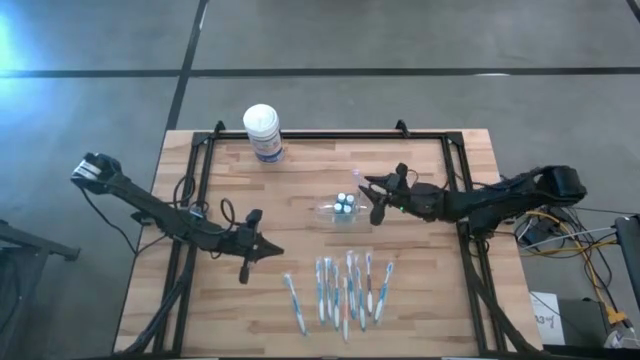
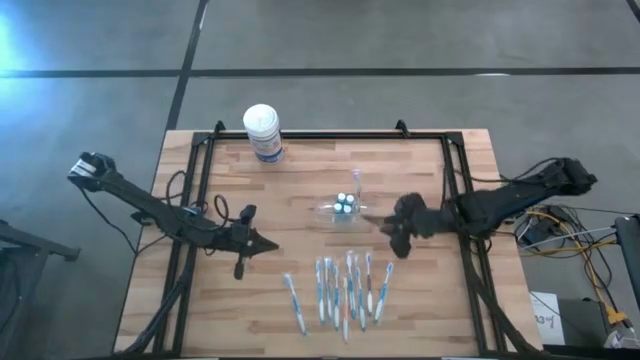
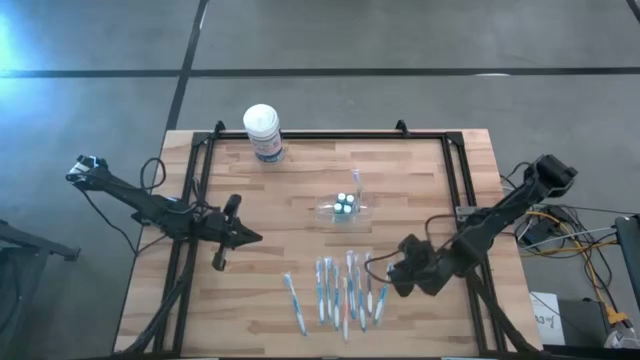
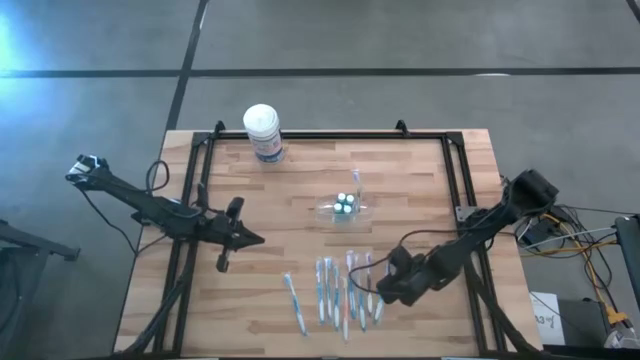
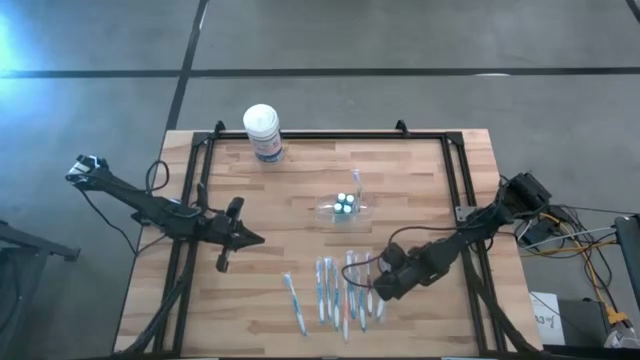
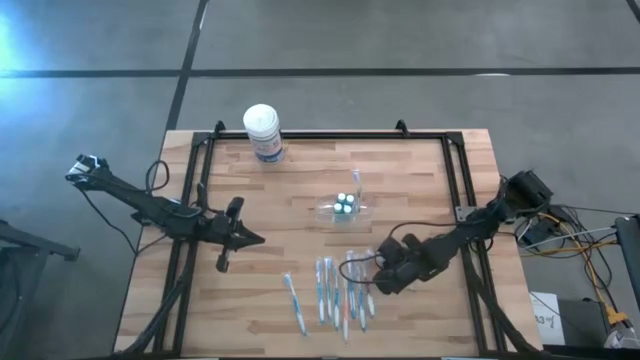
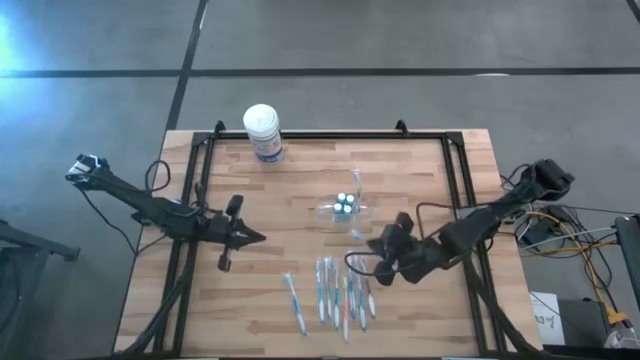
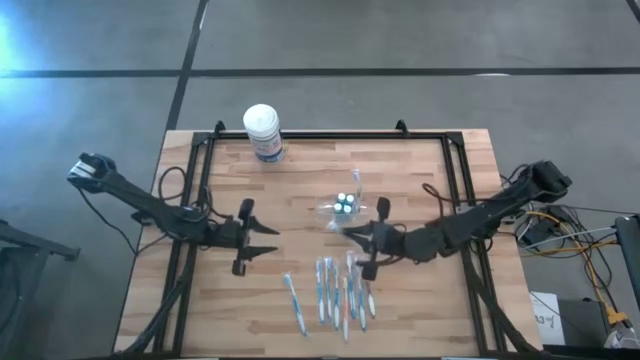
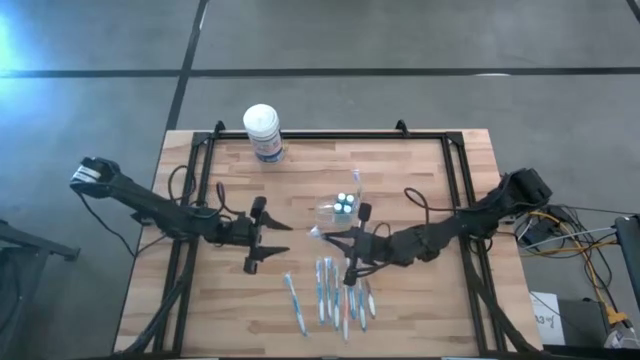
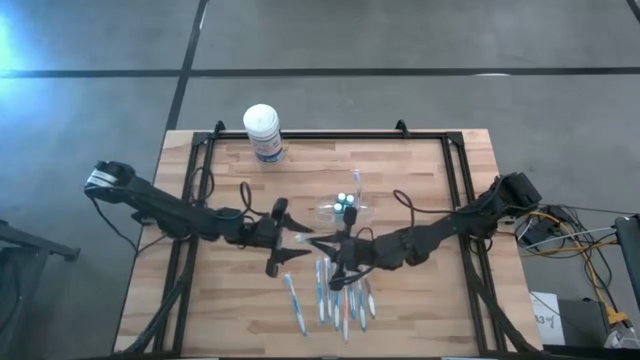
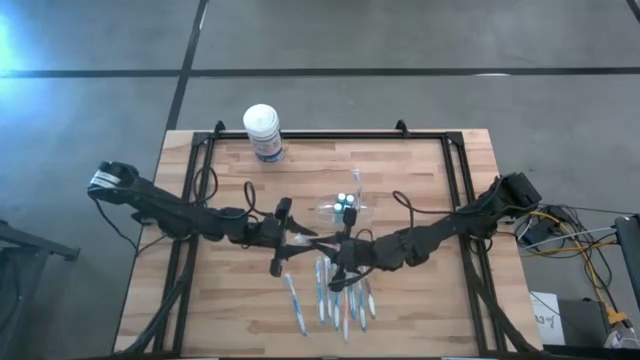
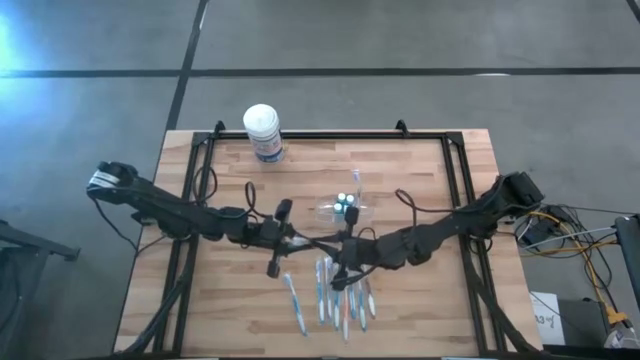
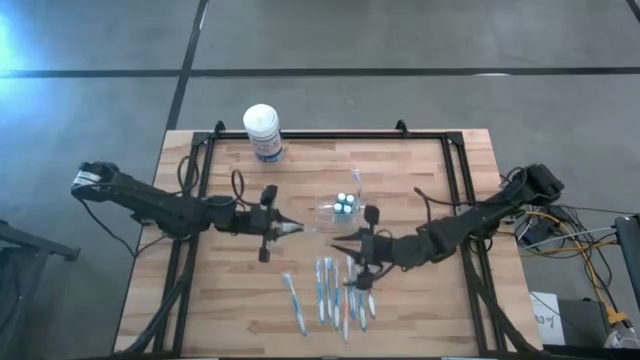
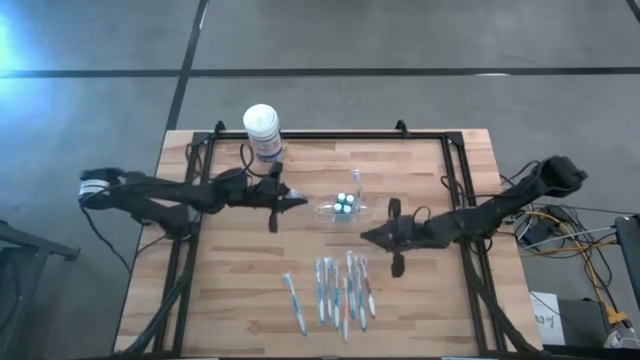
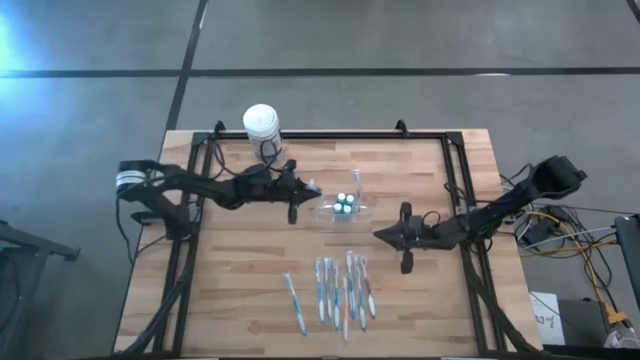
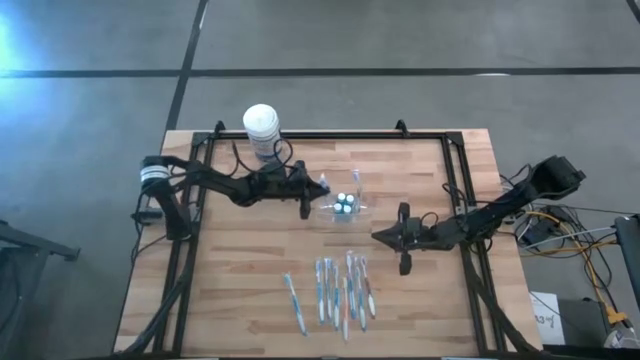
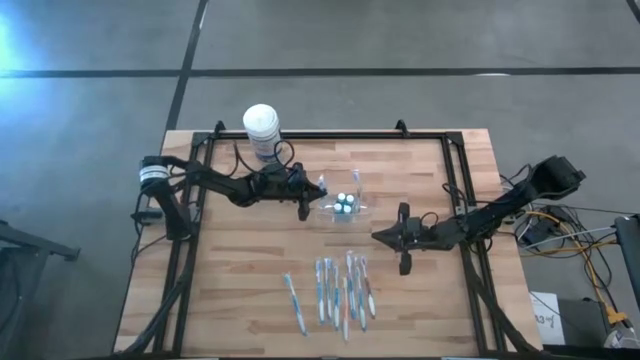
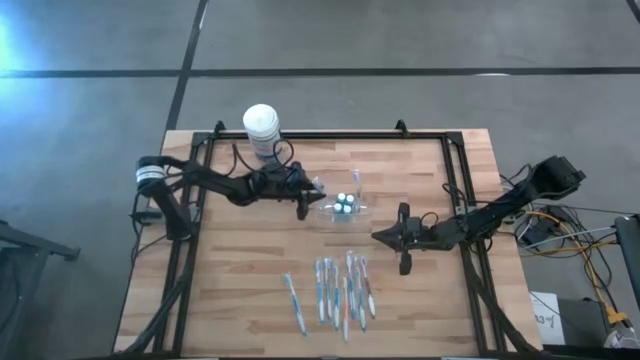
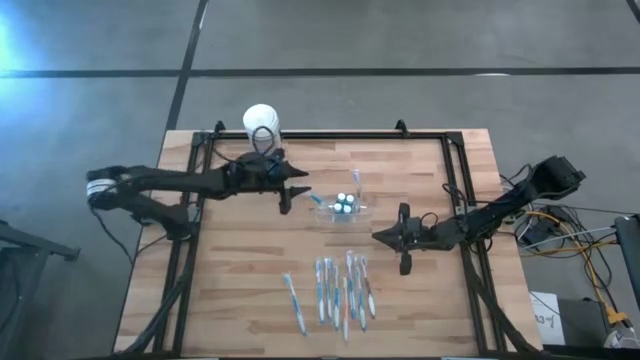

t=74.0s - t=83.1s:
Task: Pick & Place toothbrushing station
Put the blue toothbrush into the transparent organizer

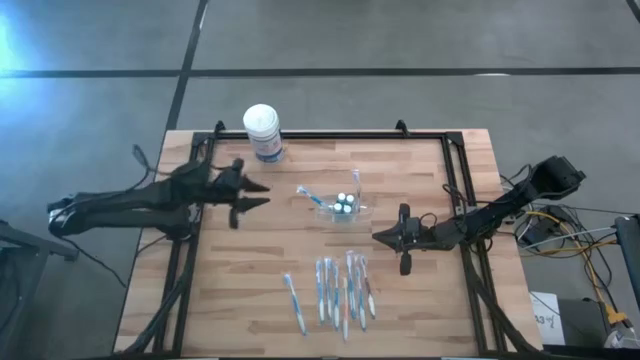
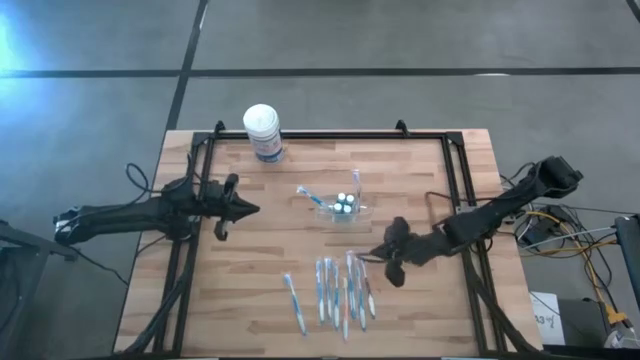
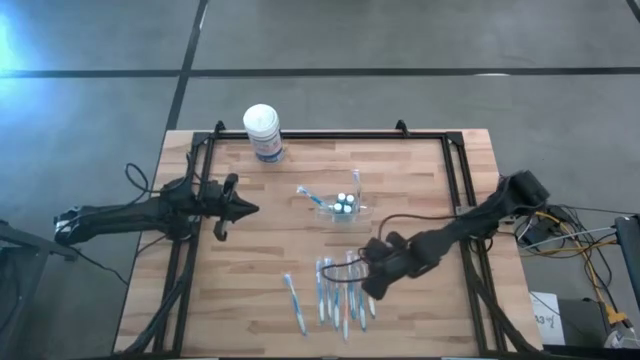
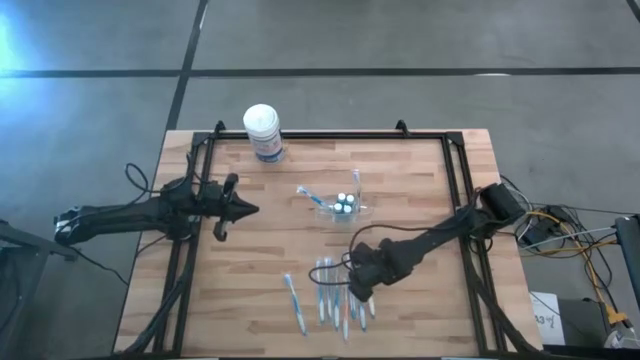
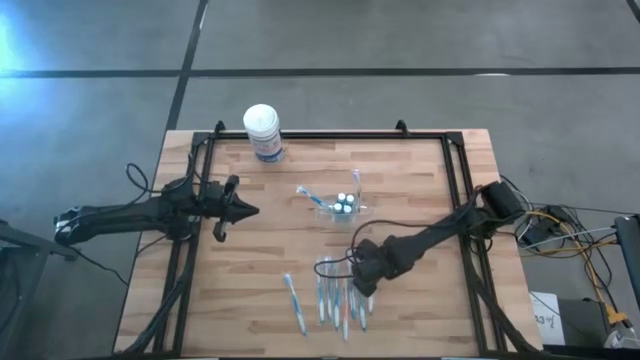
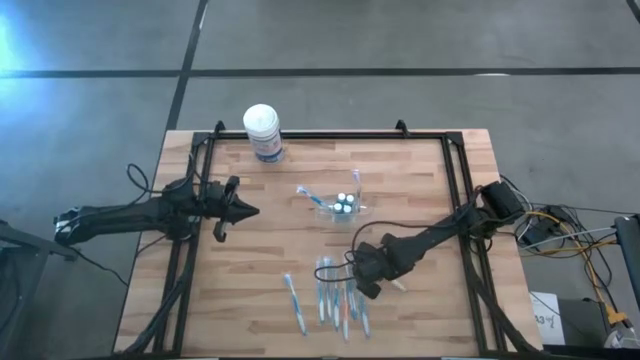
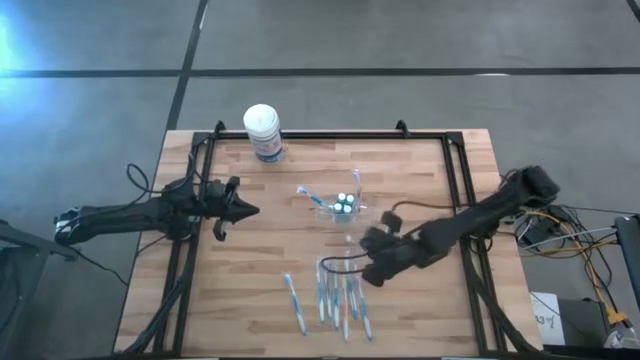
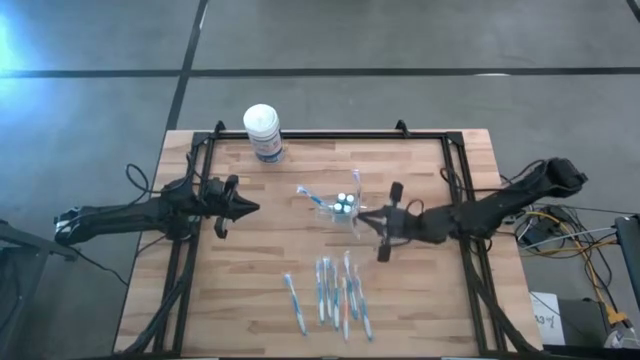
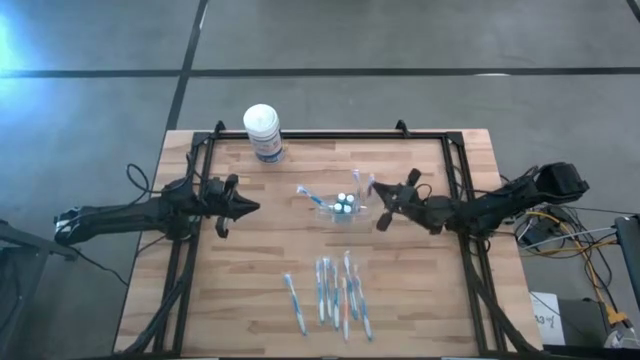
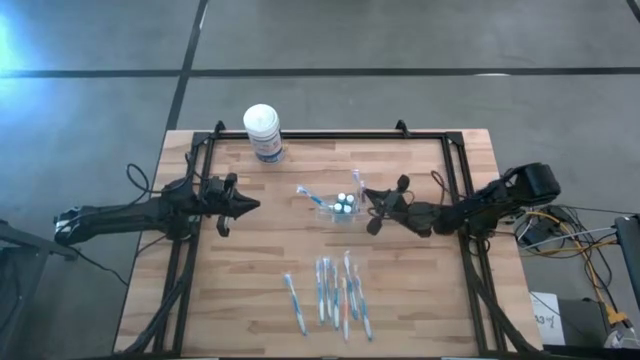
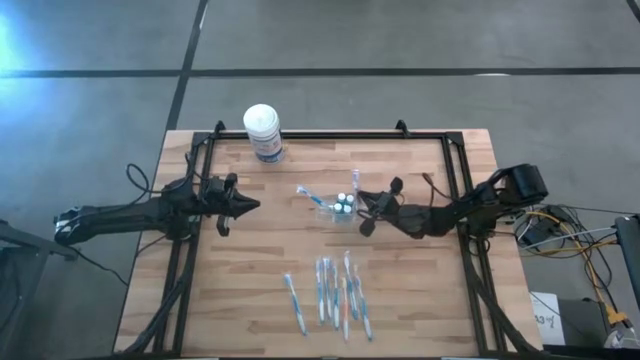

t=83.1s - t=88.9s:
Put the purple toothbrush into the transparent organizer

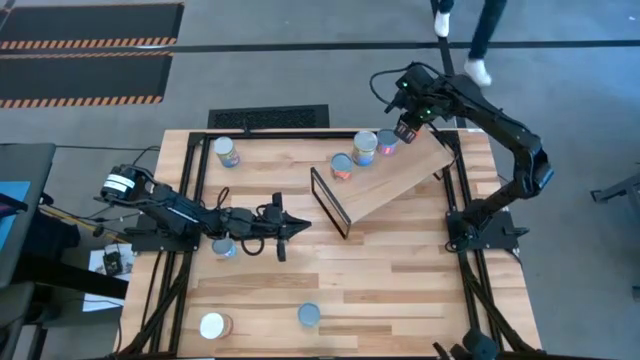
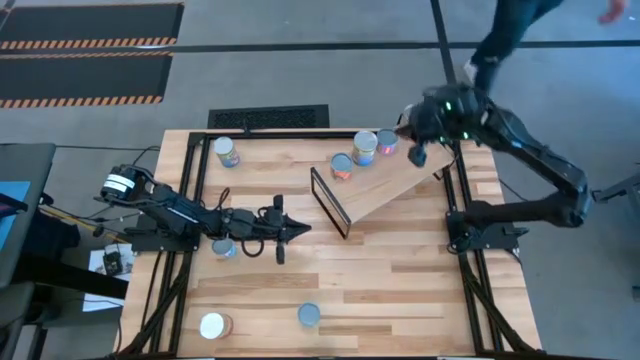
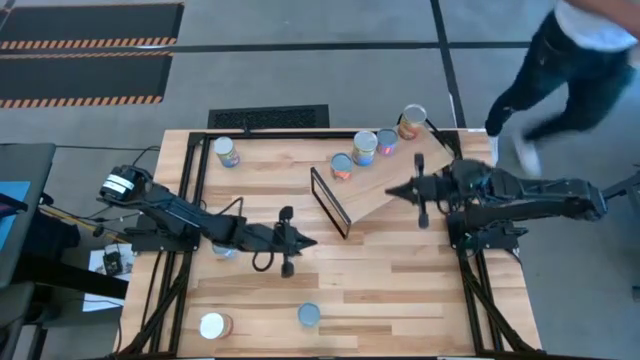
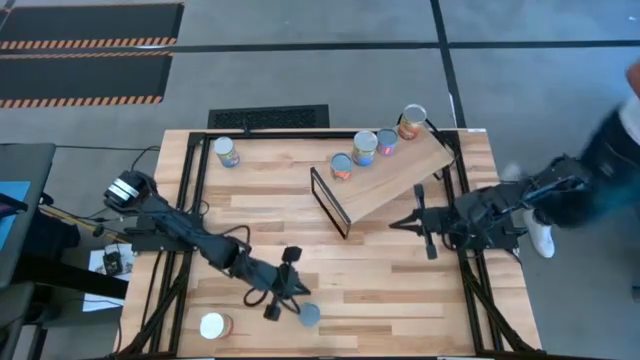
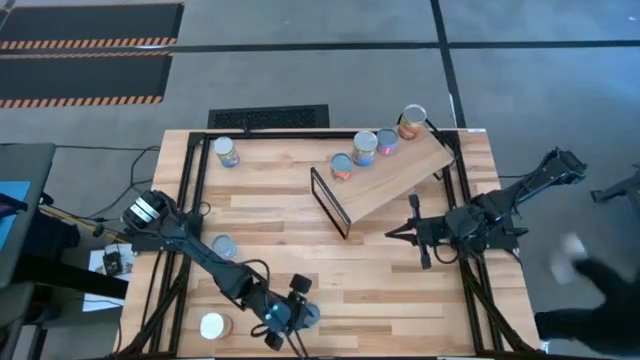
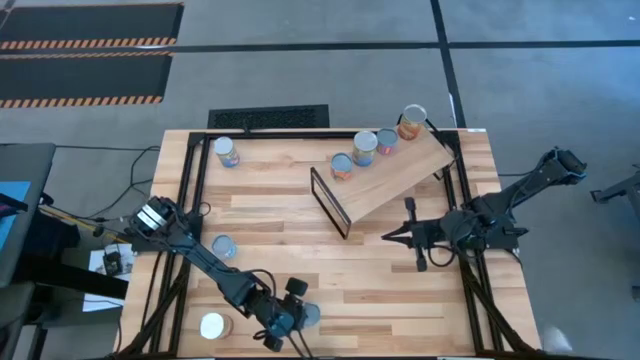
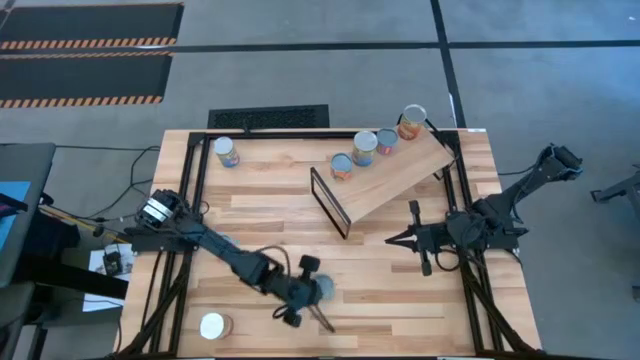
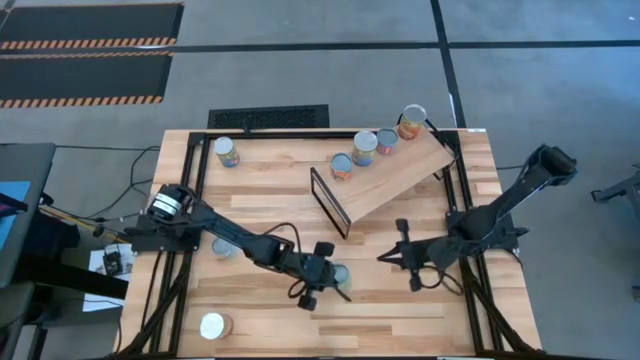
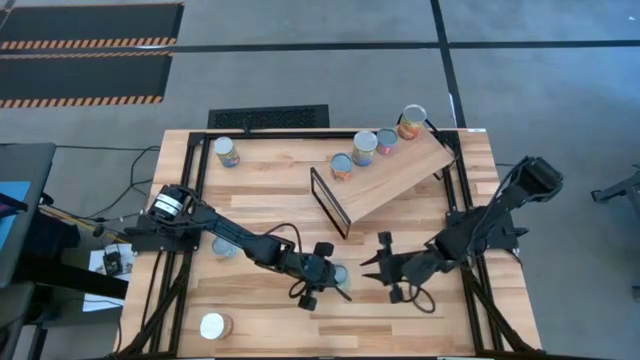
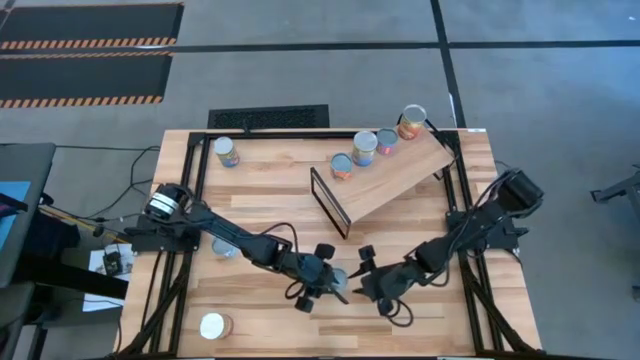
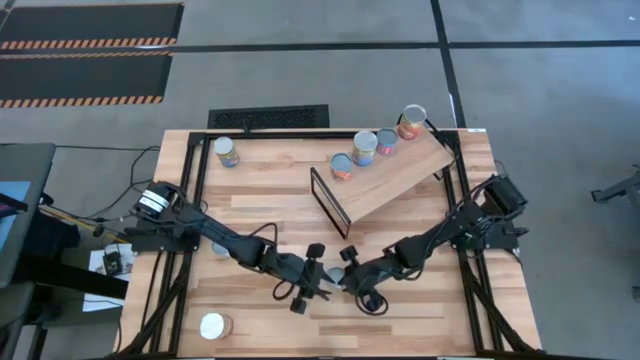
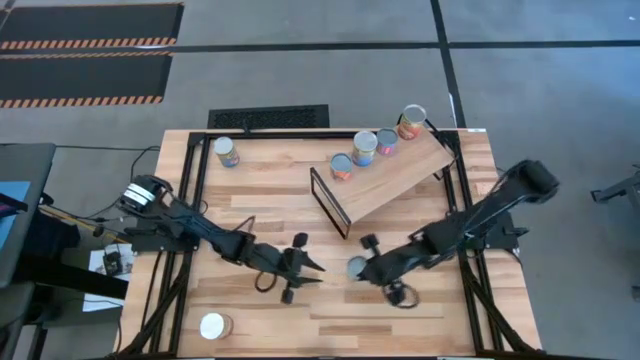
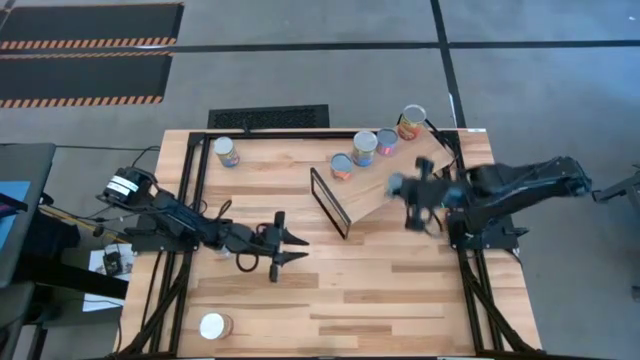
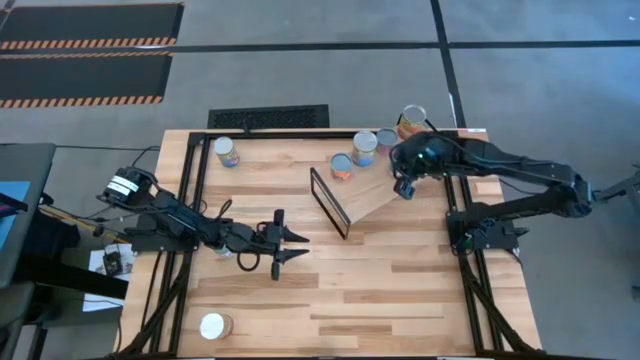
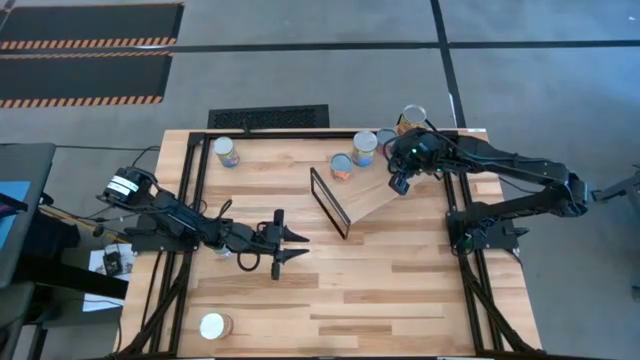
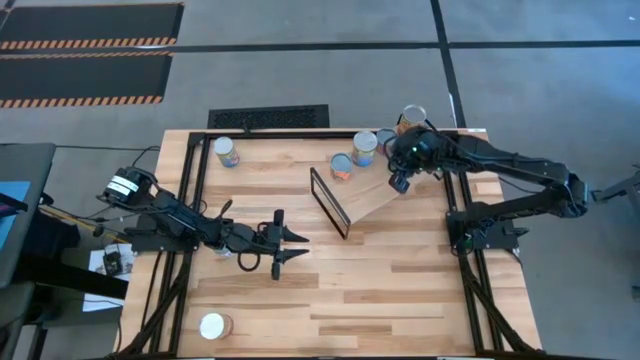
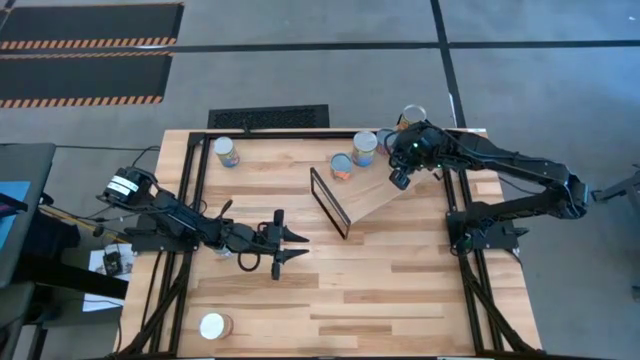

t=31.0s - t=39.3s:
Task: Pick and place cans onto a shelf
Put the canned peas on the shelf
